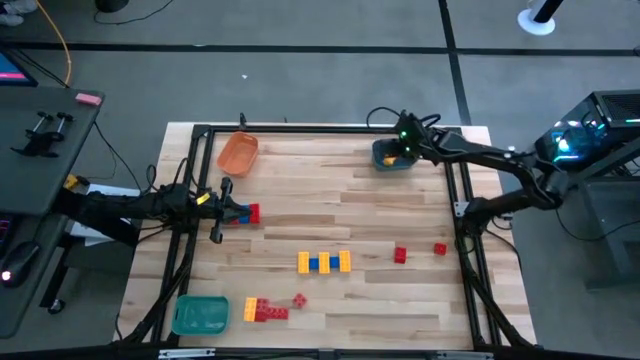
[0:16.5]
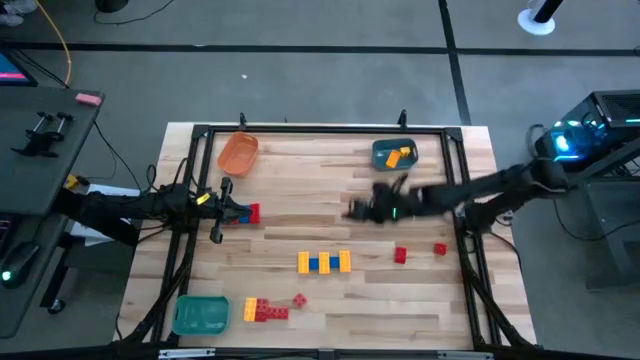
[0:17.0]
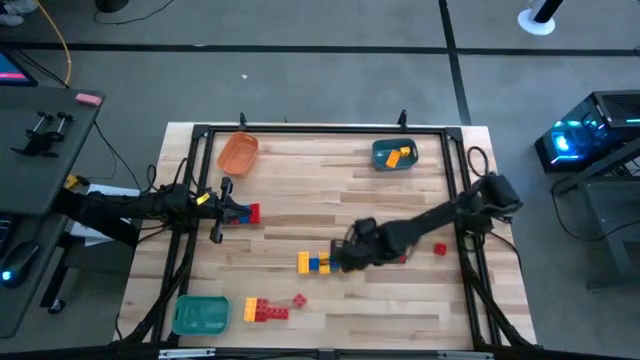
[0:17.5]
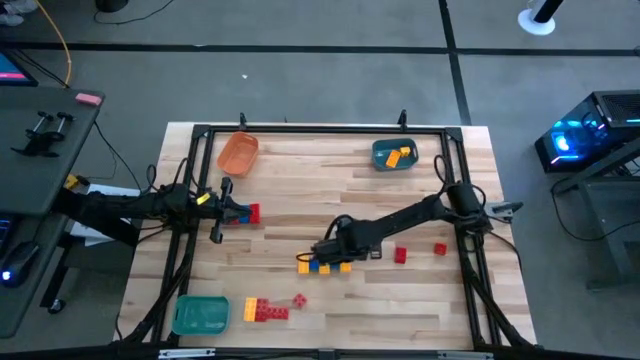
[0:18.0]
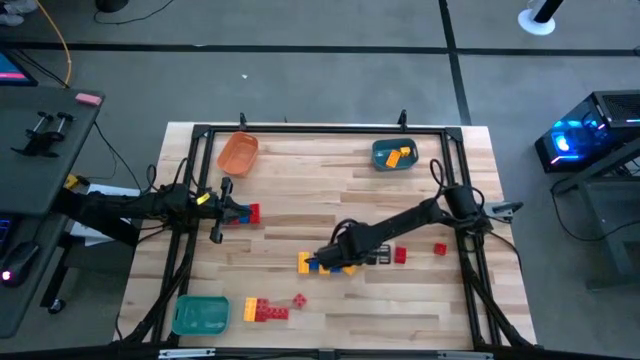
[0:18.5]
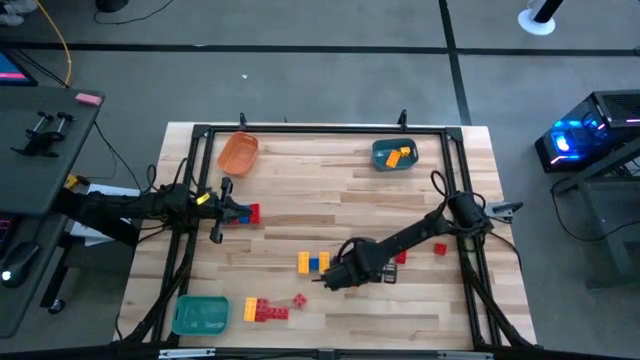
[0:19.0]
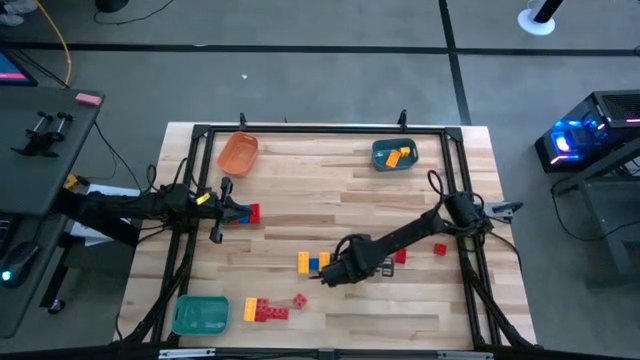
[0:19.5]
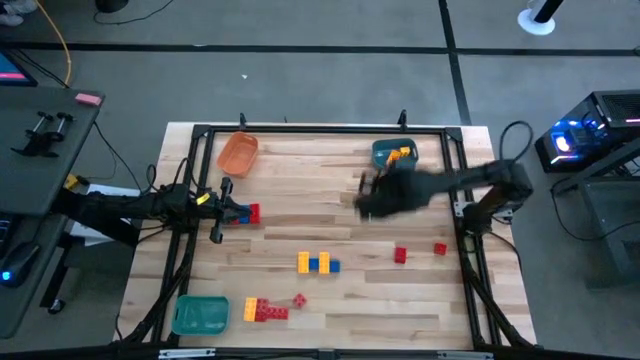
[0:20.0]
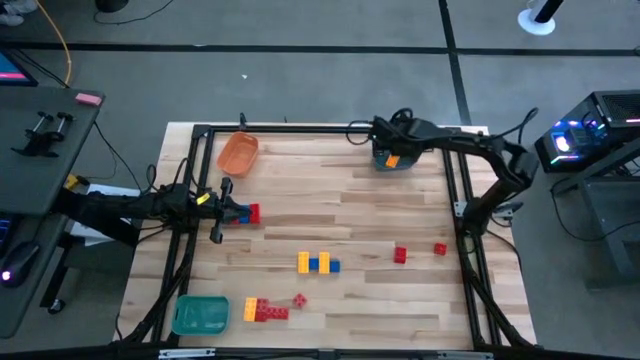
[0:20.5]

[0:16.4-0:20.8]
Task: Sort blocks
Put the yellow game piece into the blue bin

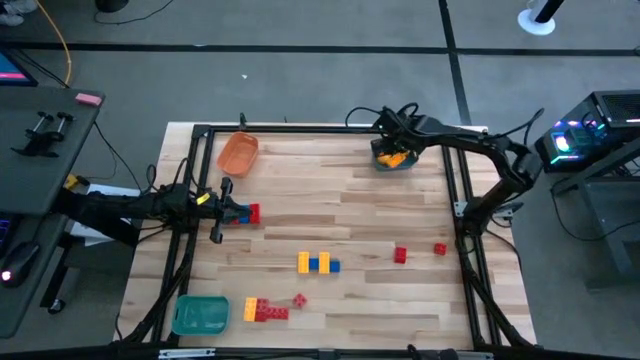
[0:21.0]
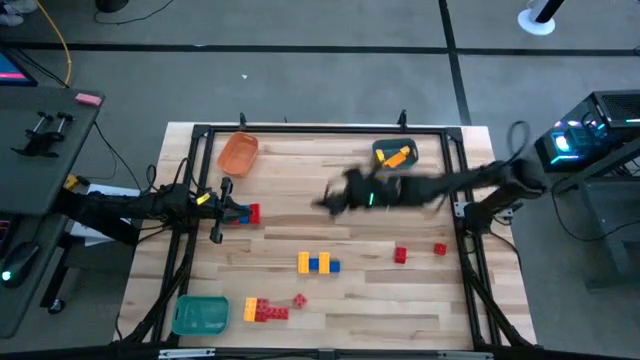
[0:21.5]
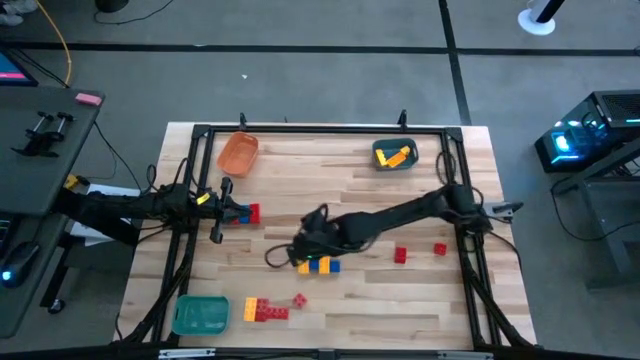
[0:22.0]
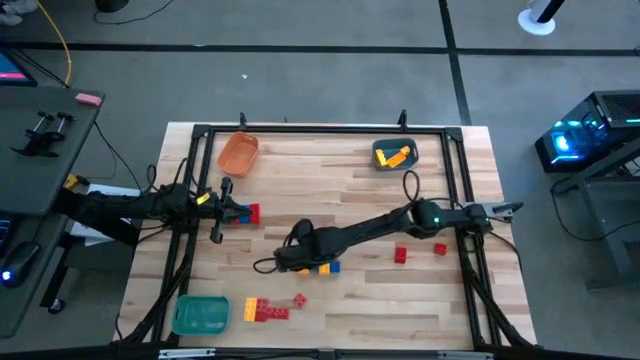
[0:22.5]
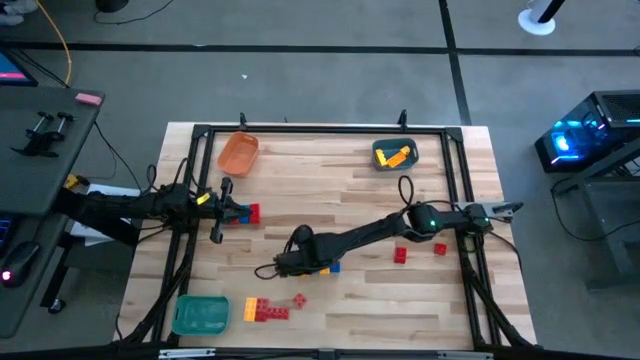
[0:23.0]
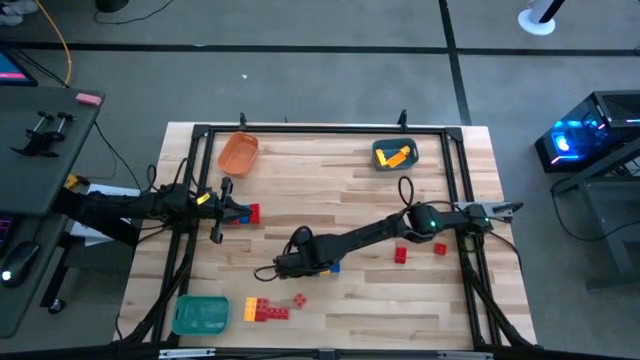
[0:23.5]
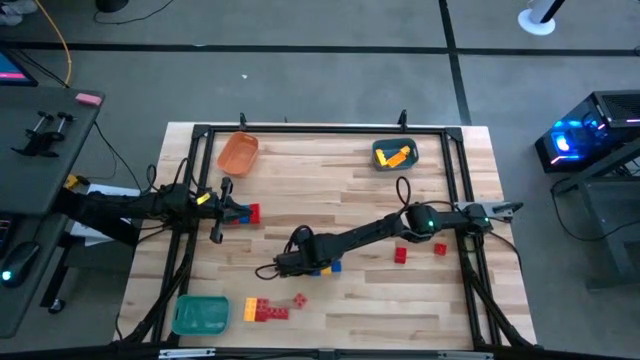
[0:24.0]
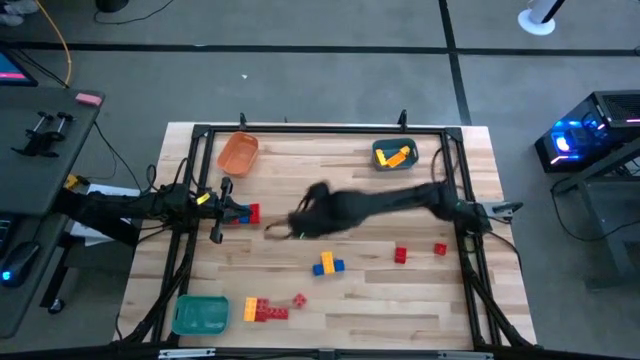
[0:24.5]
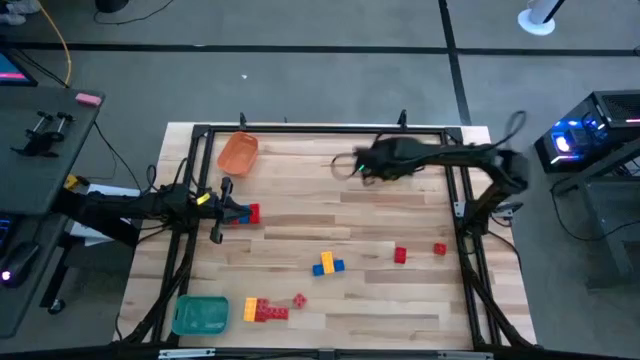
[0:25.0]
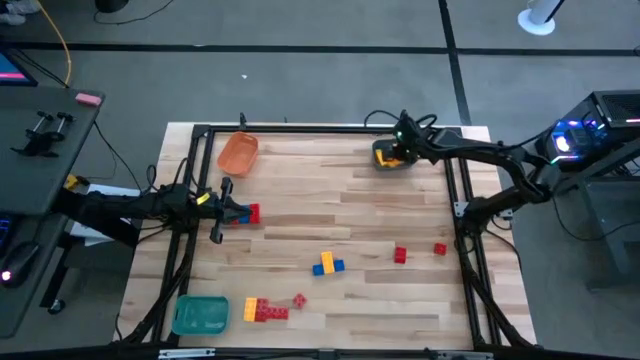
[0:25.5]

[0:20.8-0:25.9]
Put the yellow game piece into the blue bin

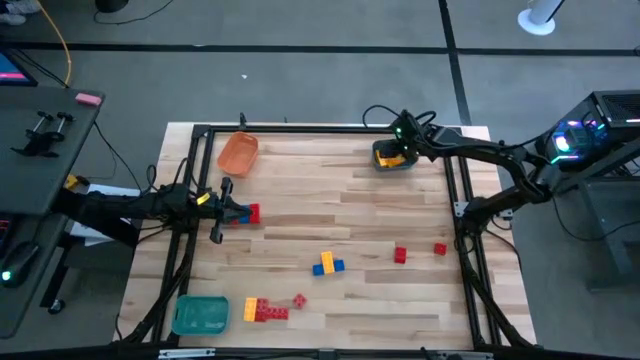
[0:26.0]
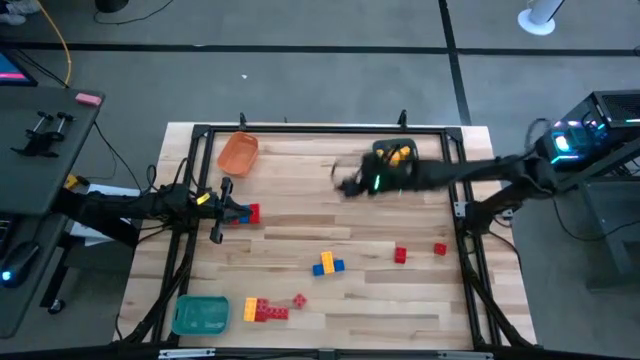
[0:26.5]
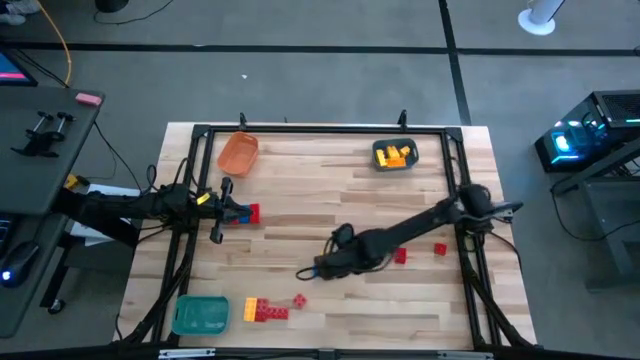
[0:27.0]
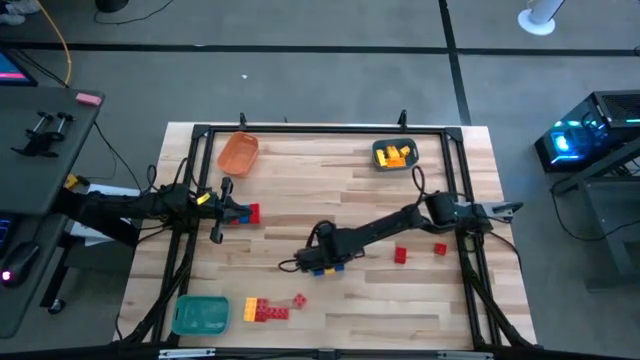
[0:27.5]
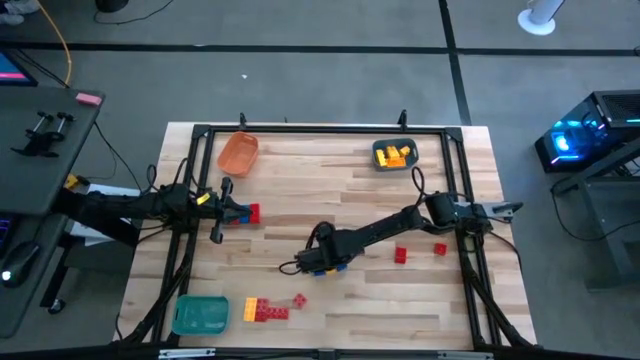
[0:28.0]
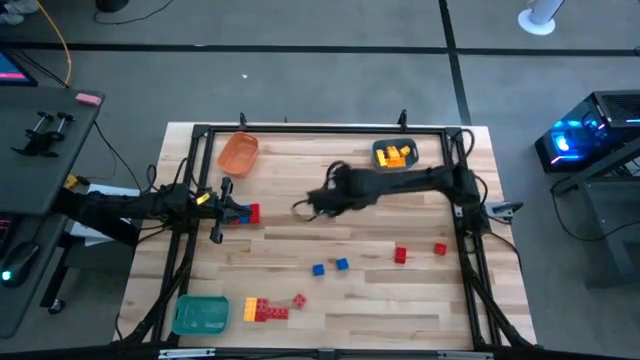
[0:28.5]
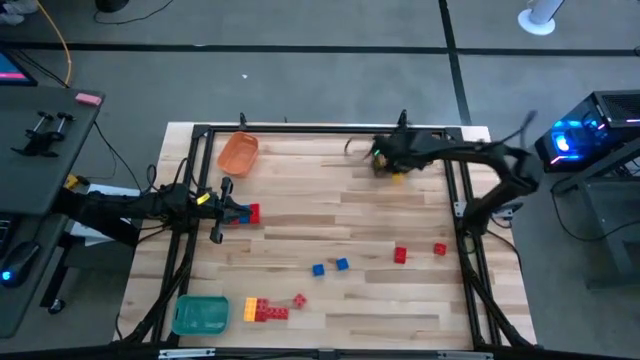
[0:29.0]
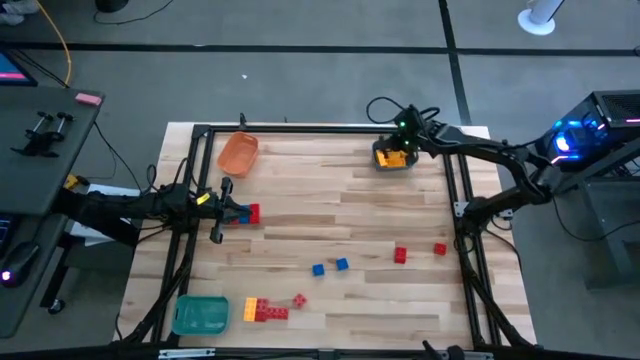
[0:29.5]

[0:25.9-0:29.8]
Put the yellow game piece into the blue bin

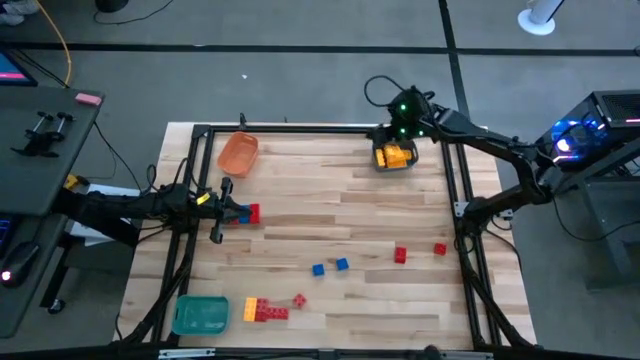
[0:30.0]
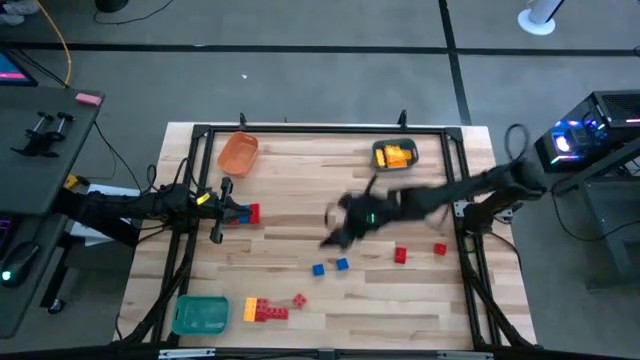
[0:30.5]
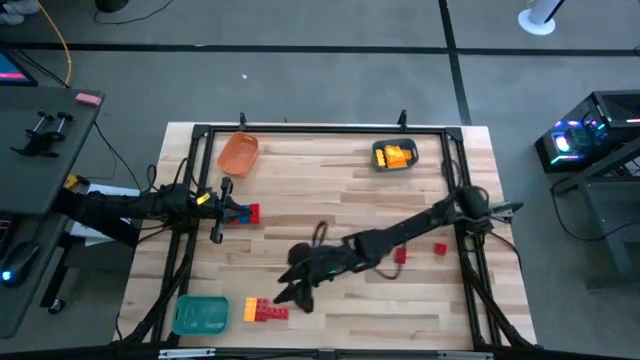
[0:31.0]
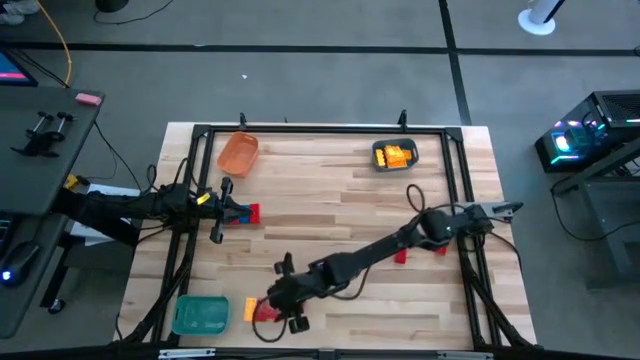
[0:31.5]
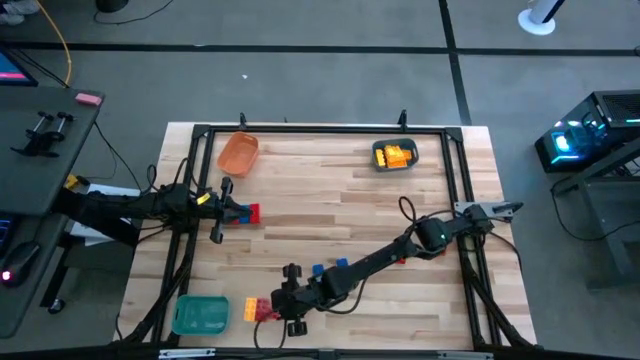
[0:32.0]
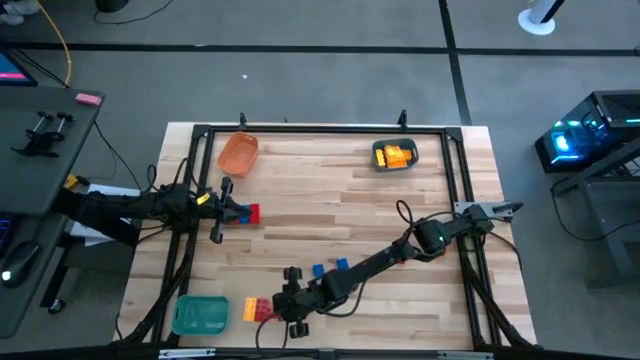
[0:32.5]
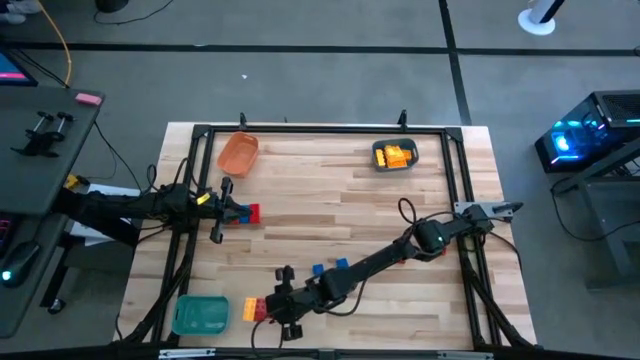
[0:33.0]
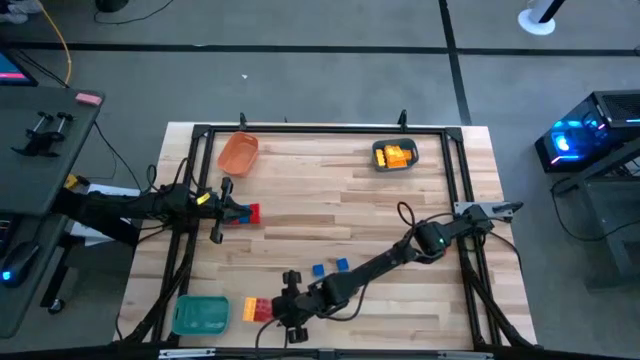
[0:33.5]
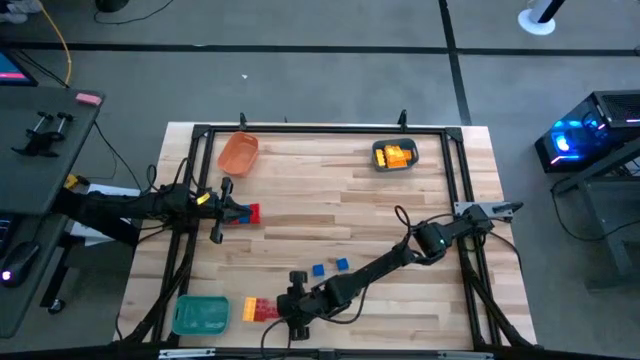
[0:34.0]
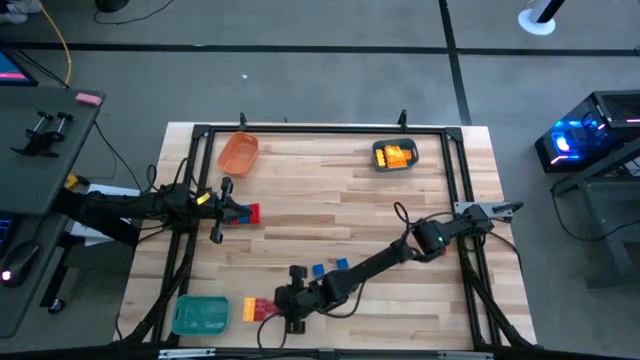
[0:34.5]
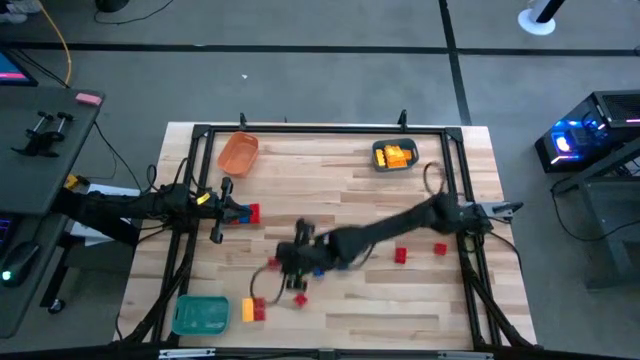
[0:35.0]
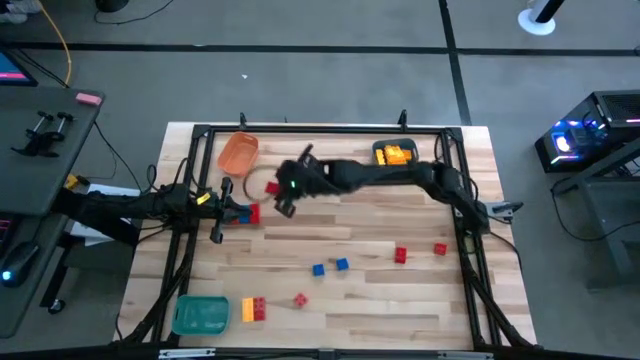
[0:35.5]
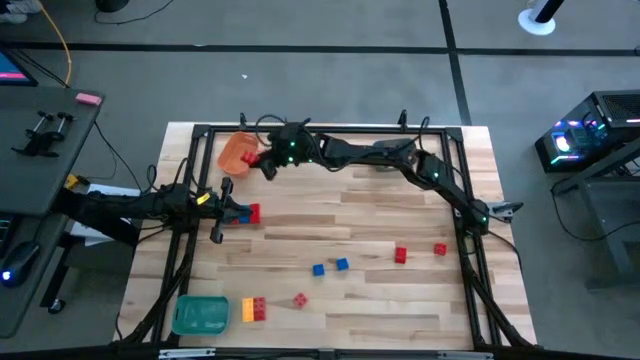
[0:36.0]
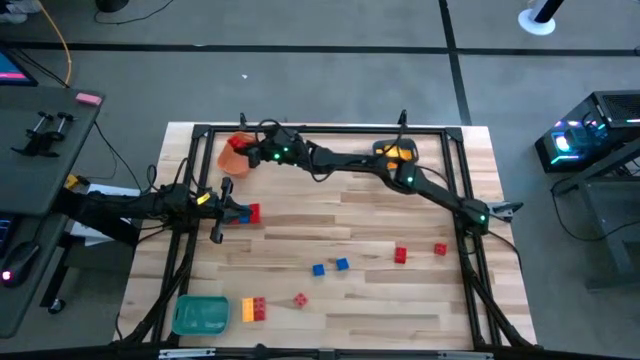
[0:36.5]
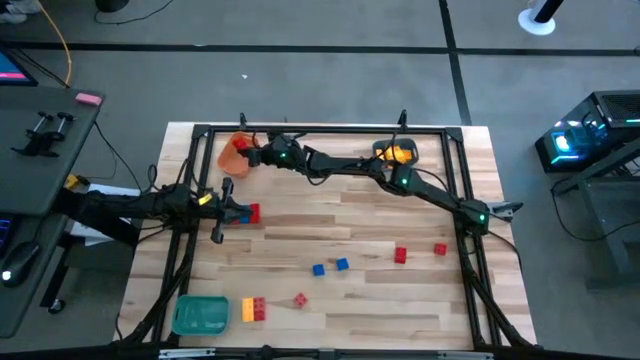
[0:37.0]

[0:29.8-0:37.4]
Put the red game piece into the orange bin
